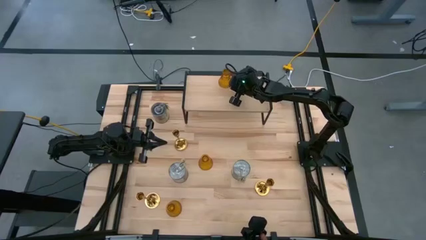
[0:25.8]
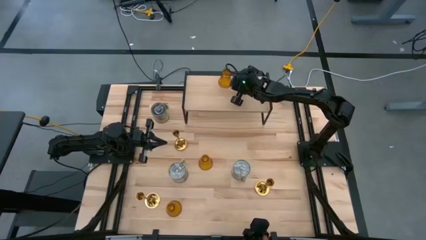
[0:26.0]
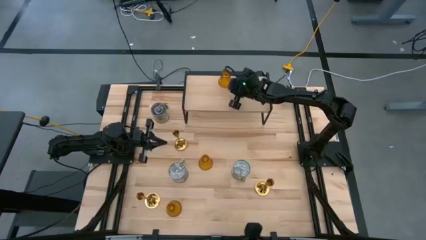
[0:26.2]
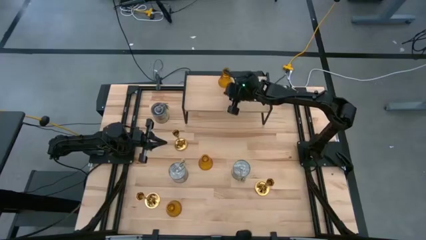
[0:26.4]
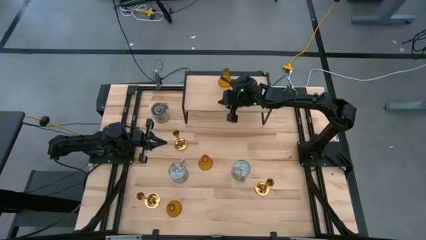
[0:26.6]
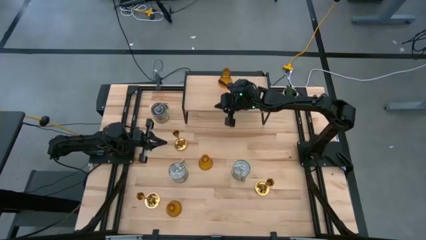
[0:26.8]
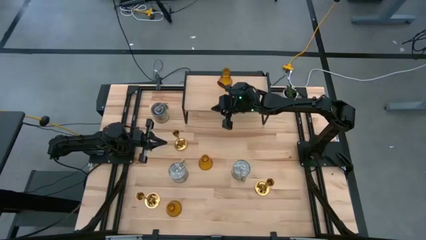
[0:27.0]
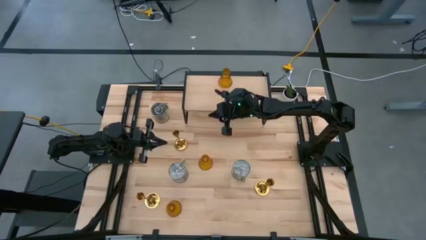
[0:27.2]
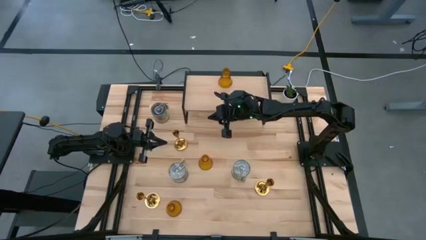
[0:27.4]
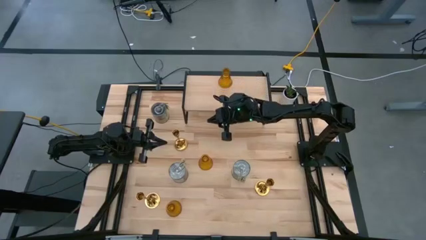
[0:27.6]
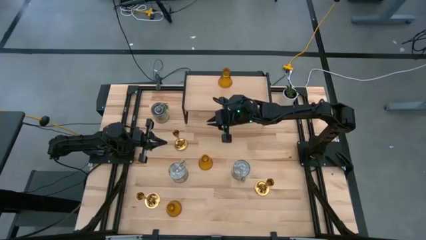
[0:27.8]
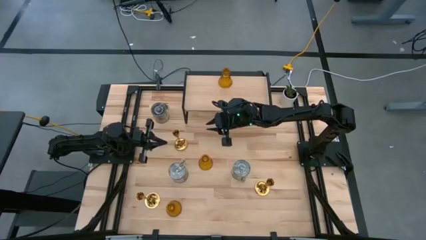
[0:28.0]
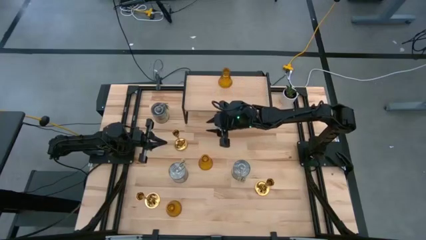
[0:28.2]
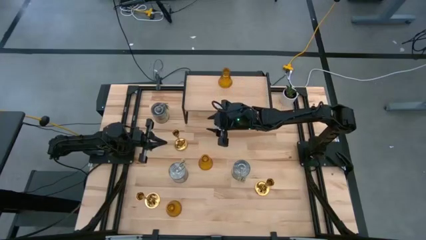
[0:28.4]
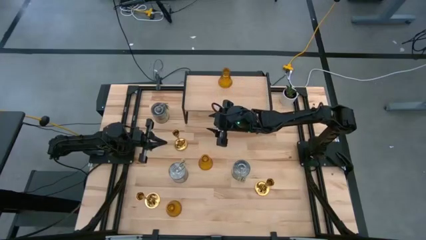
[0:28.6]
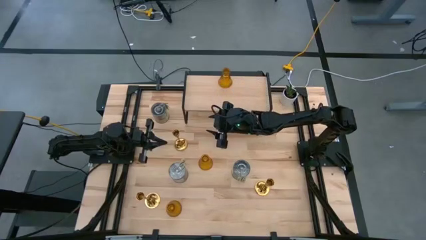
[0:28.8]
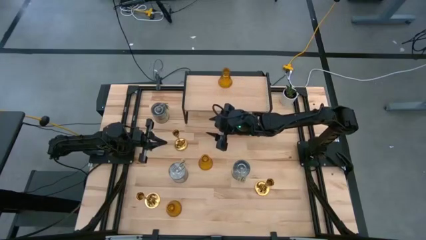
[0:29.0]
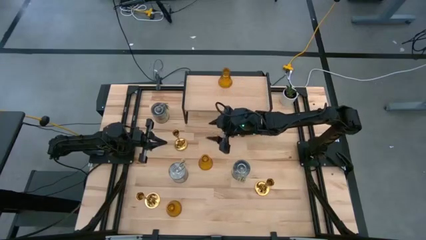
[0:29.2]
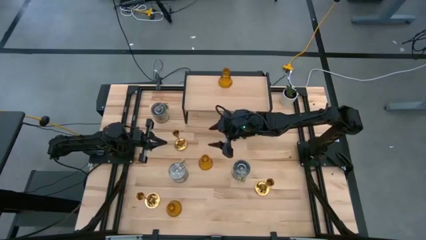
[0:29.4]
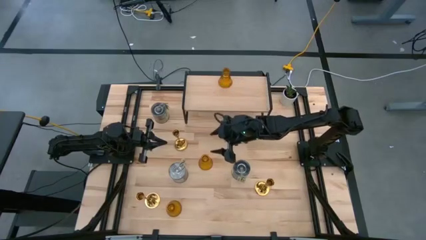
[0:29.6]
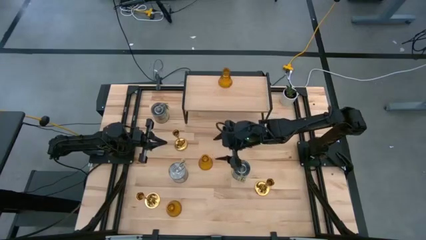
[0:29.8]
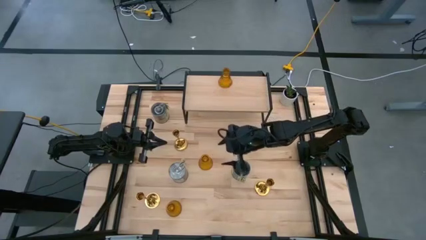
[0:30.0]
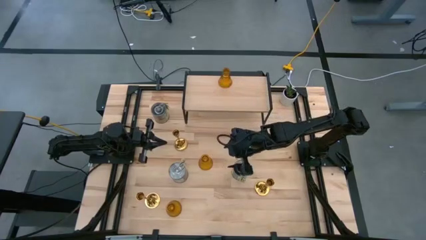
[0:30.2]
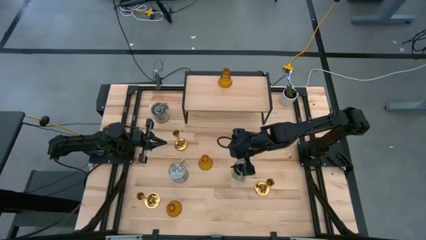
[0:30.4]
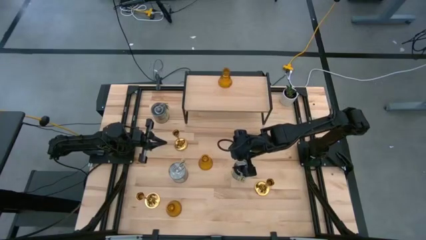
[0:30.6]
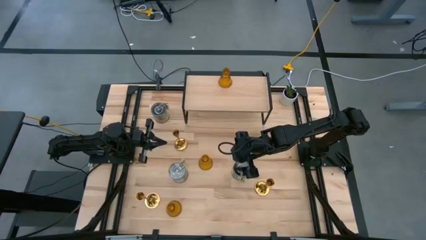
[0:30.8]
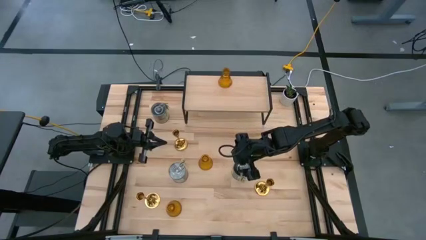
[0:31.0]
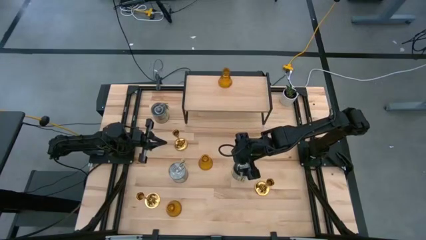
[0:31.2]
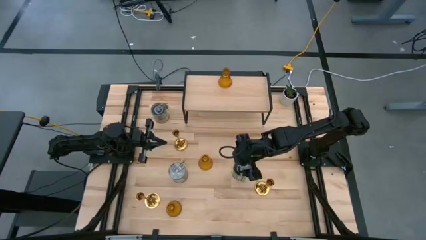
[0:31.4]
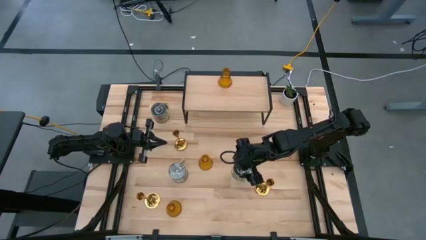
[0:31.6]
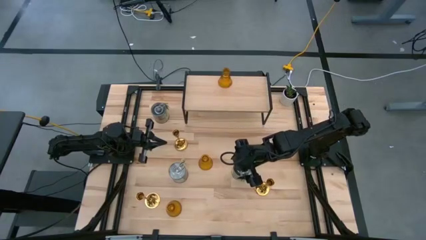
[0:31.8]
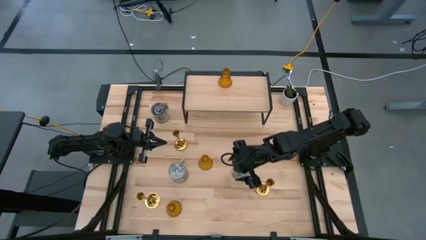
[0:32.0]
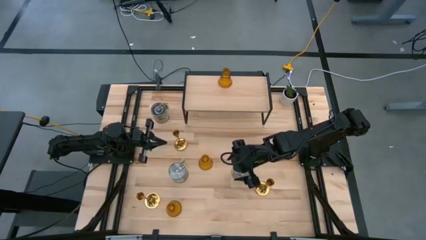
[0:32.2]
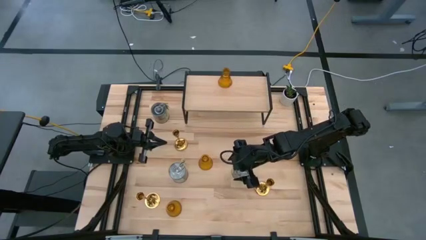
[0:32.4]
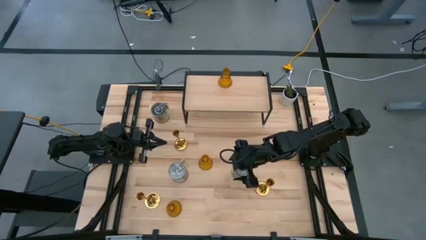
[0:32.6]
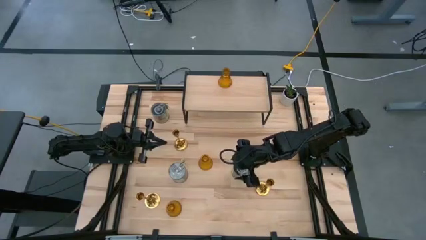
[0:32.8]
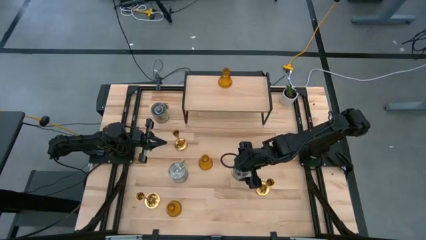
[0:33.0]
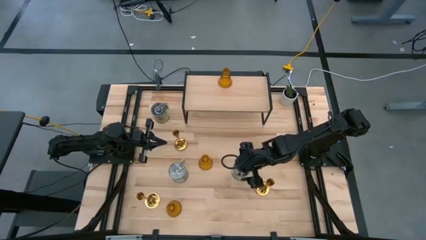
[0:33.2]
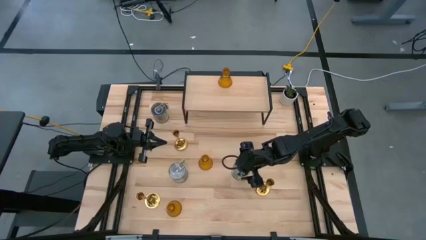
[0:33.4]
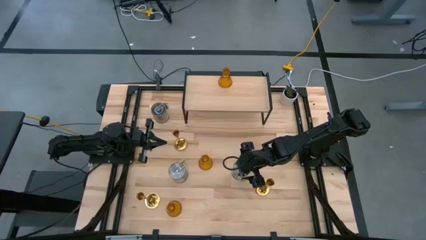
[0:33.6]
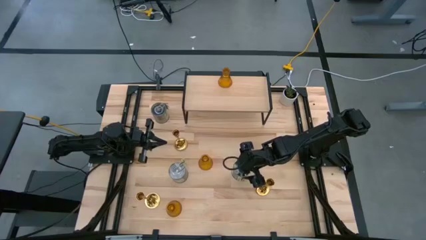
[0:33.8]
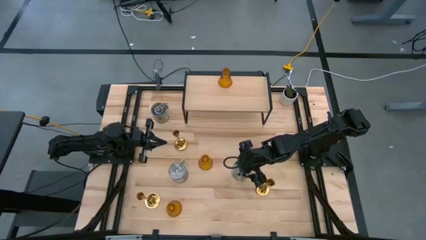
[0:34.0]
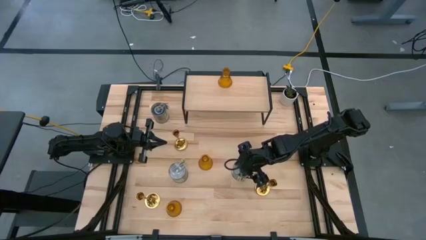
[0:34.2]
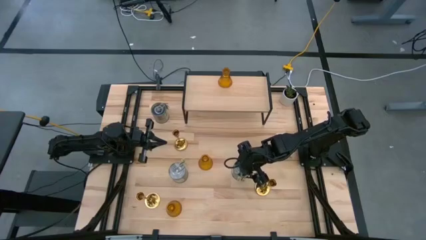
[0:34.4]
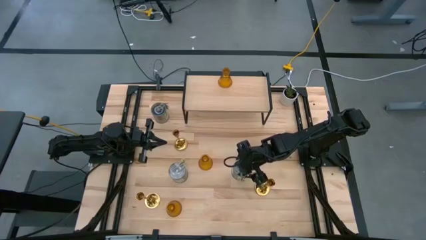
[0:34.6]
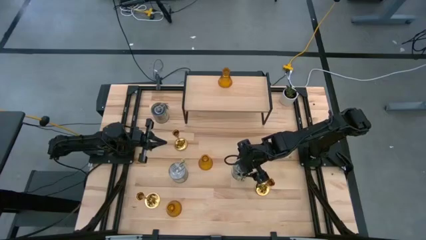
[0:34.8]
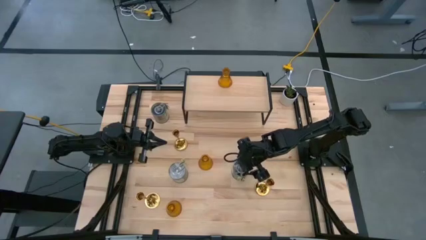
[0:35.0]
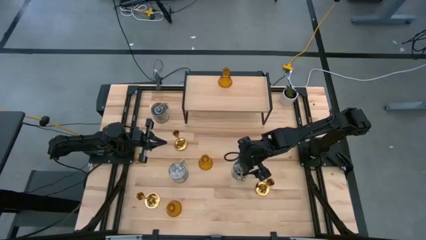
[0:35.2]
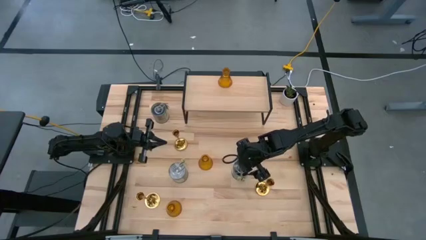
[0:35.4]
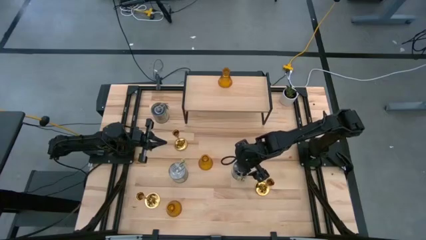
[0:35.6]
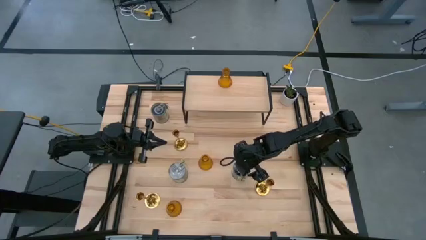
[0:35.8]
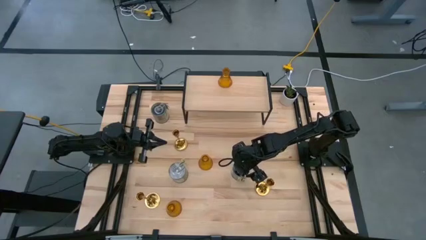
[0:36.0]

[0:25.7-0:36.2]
Task: Pick & Place candle stick holders
Put the bottom right scented candle on the shelf

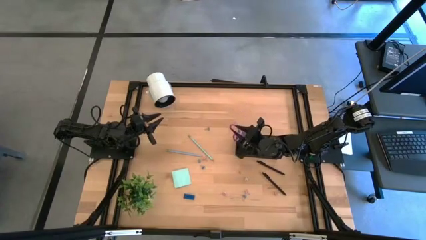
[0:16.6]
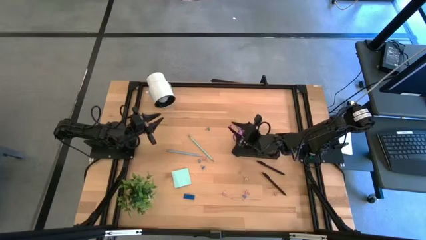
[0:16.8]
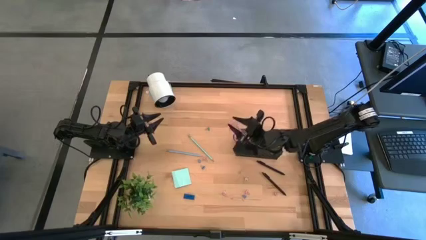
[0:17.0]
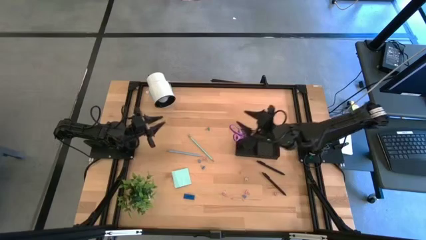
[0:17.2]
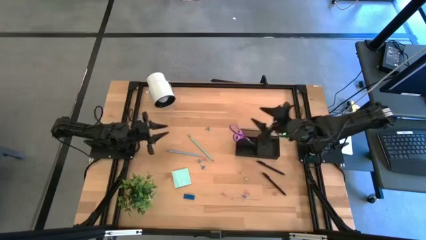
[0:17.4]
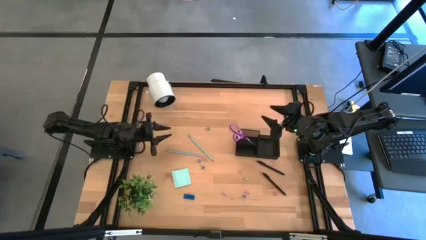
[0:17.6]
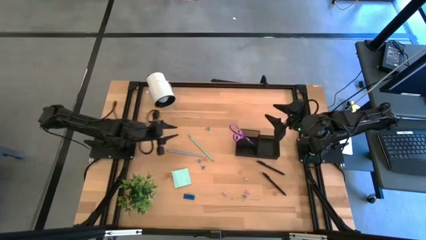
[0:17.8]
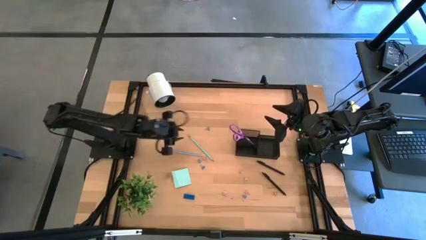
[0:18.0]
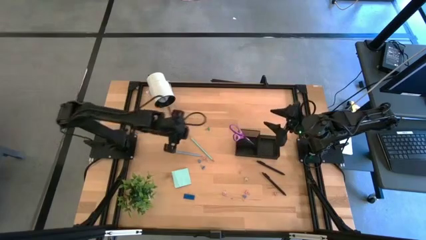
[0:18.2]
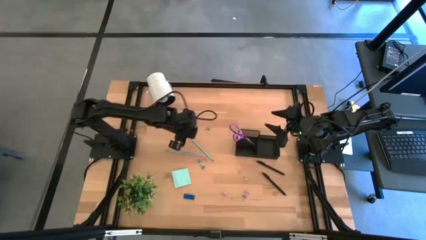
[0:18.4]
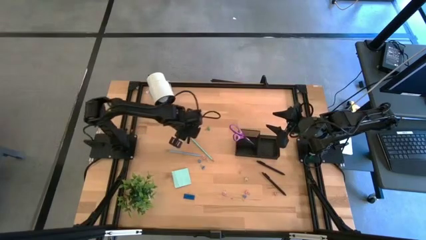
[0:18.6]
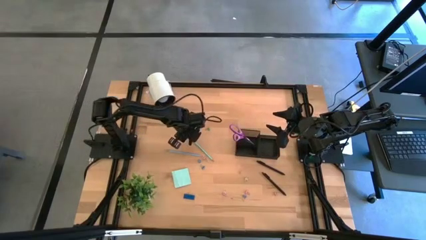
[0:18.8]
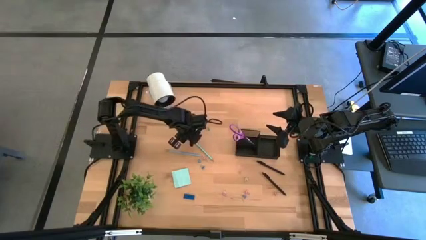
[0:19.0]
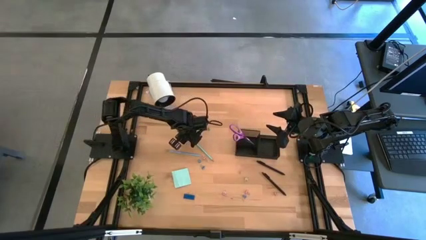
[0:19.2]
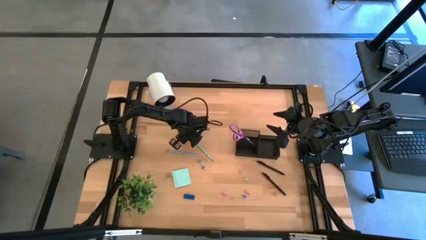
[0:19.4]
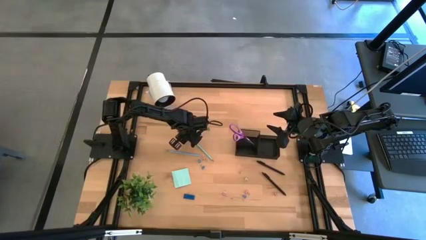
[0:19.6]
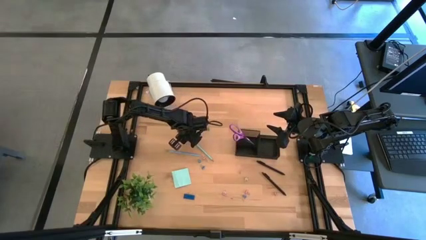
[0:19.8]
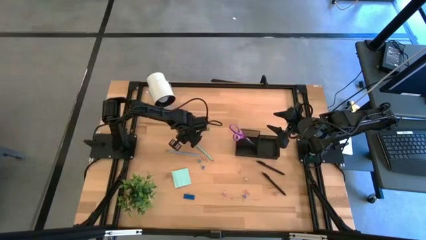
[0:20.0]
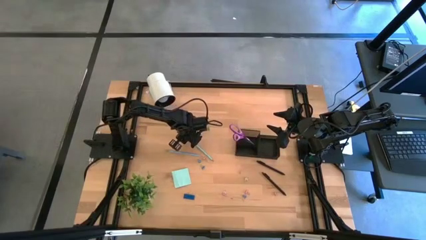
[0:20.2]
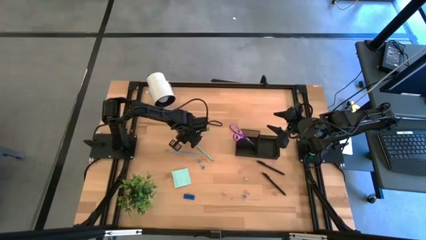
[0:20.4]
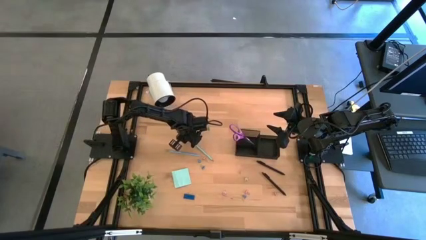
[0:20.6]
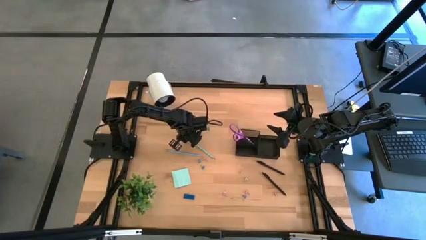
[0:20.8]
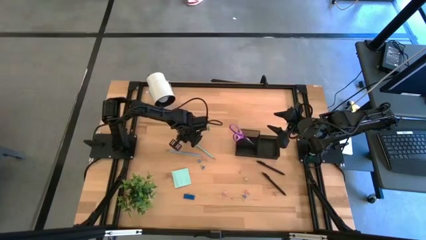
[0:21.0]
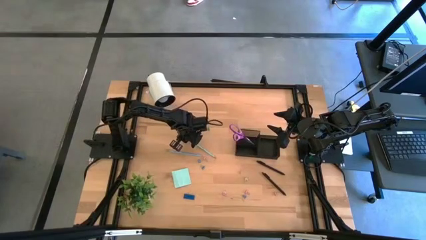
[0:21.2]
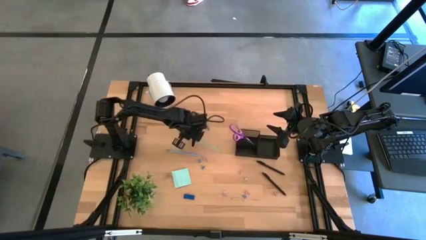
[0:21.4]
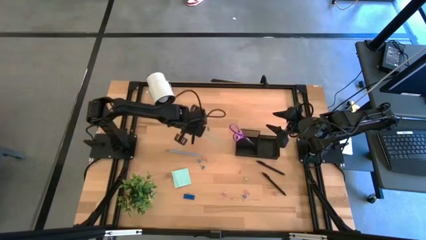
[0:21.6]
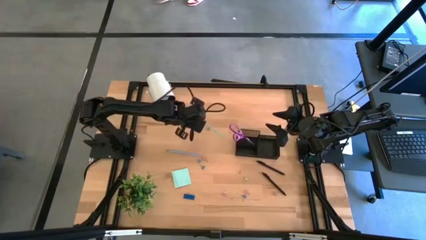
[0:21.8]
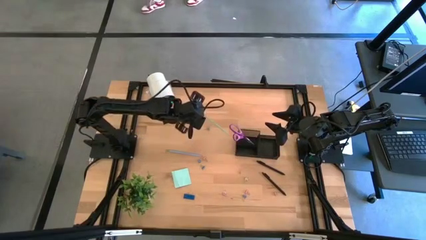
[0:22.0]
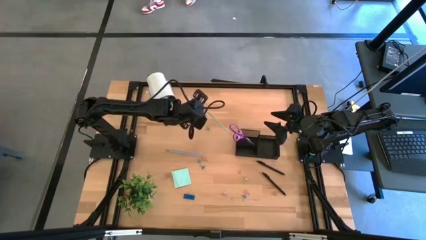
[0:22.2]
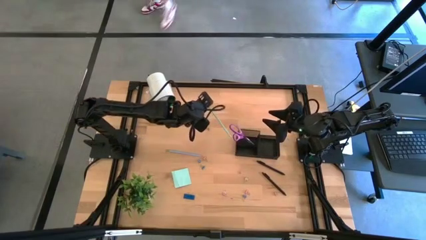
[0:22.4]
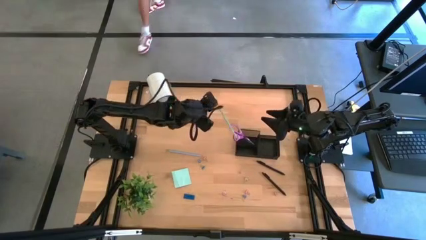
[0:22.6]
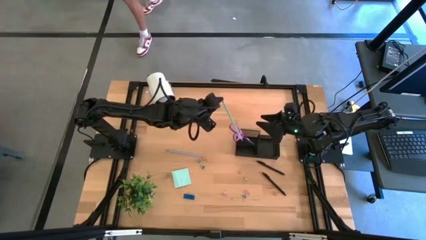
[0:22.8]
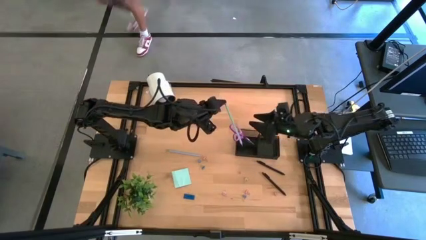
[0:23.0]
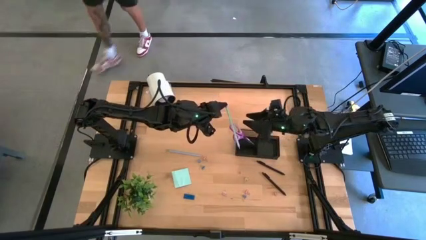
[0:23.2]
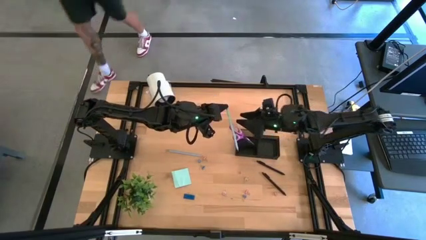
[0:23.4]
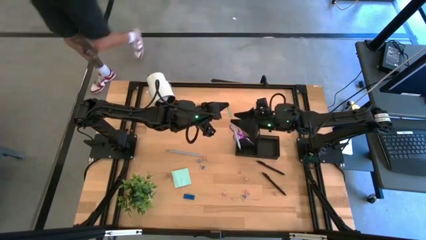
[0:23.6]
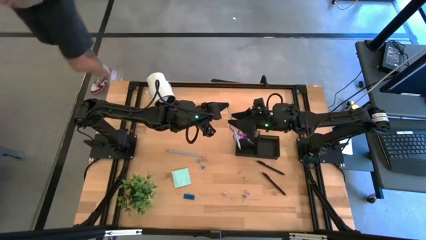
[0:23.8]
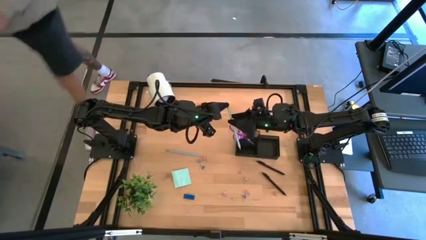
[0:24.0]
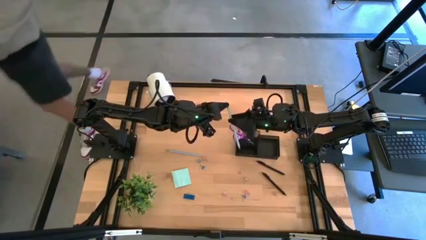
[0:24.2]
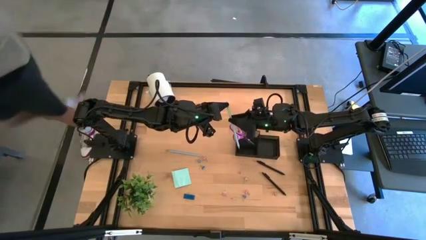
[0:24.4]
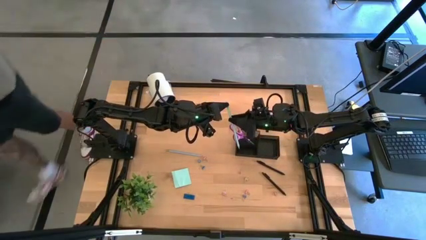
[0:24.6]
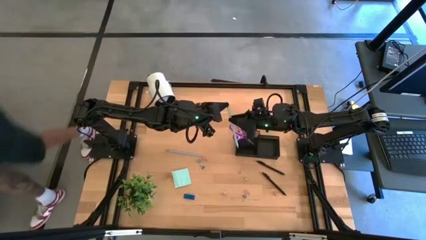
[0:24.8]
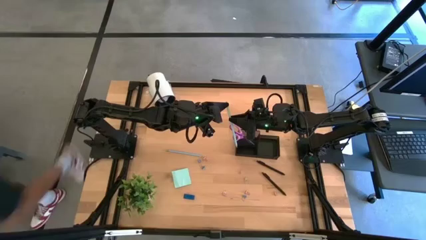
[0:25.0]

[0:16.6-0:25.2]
Task: Pick and place office supplies into organizer
Put the light blue pencil into the black desk organizer
